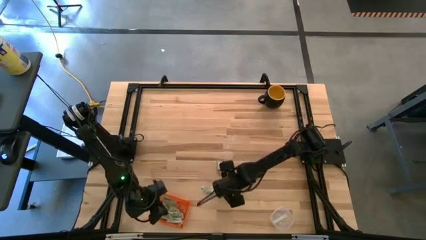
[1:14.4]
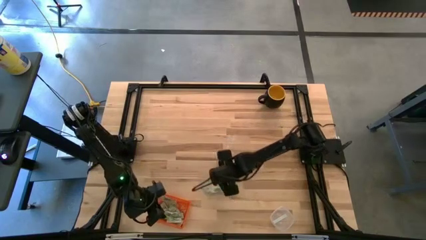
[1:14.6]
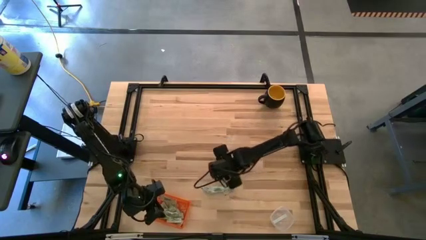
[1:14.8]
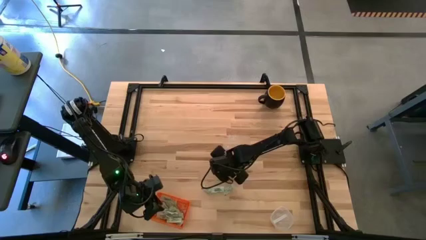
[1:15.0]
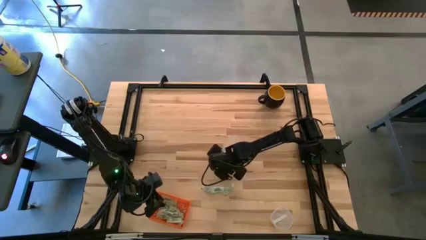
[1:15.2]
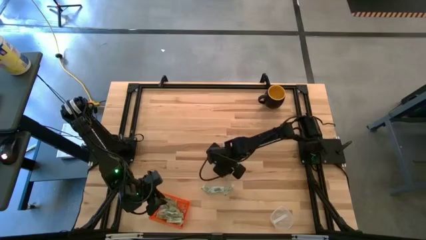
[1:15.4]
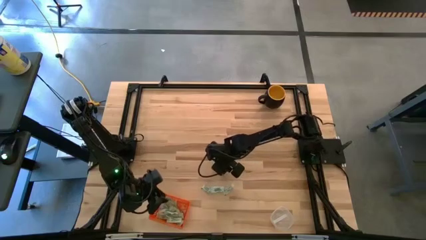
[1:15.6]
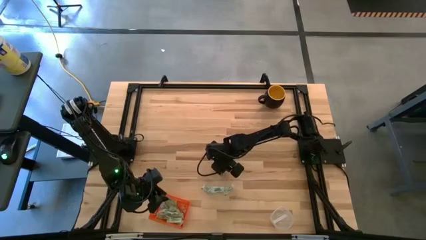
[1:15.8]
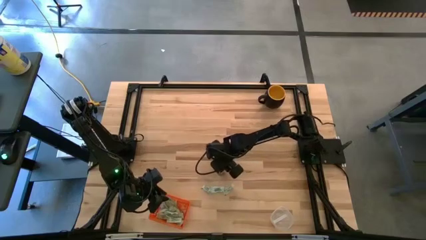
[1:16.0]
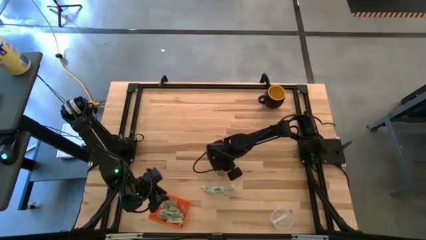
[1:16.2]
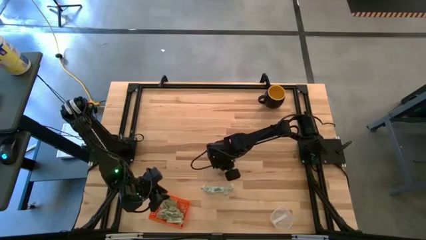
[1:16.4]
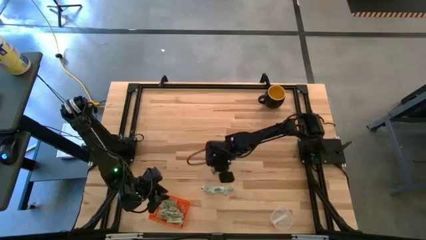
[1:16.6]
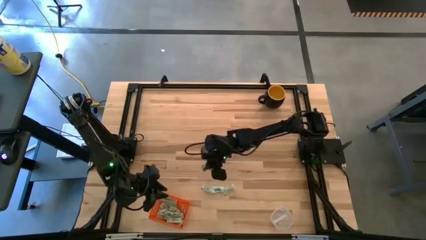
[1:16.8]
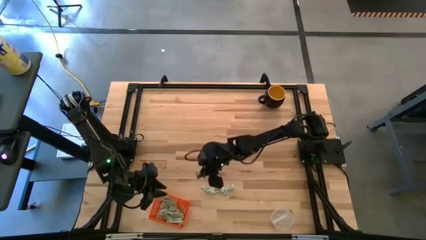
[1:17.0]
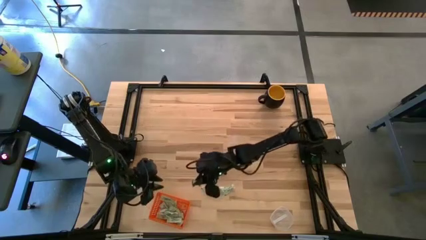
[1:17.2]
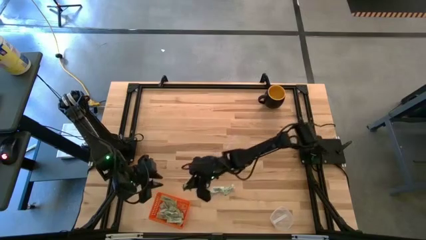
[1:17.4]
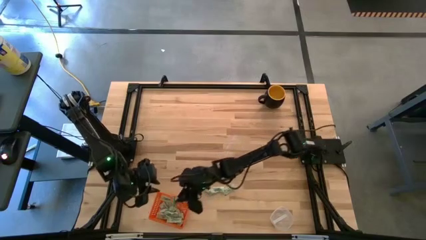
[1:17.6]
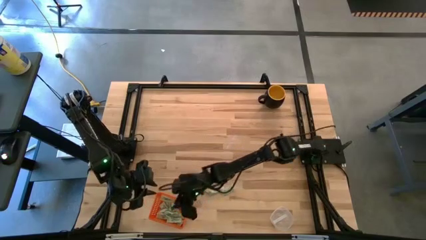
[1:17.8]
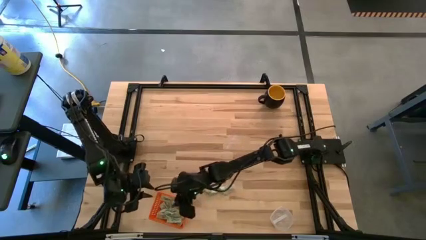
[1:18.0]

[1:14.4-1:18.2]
Task: Pick and place items into bin
Put the green stevia packet into the orange bin

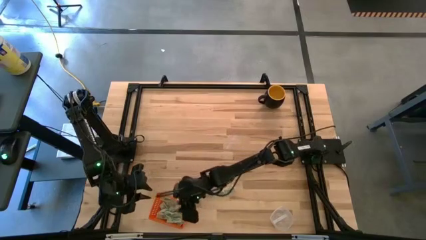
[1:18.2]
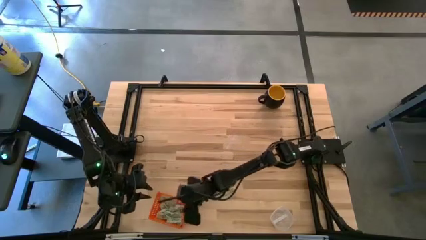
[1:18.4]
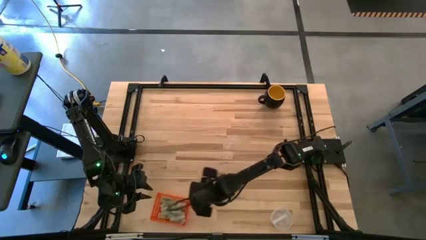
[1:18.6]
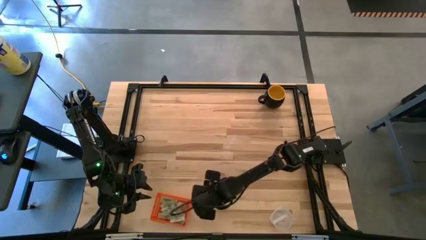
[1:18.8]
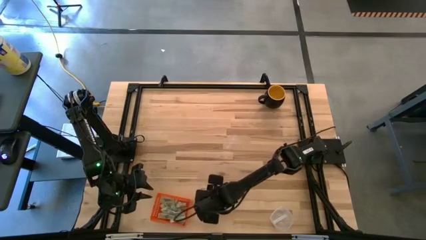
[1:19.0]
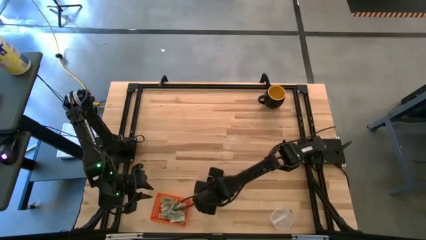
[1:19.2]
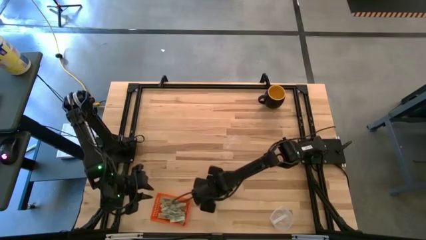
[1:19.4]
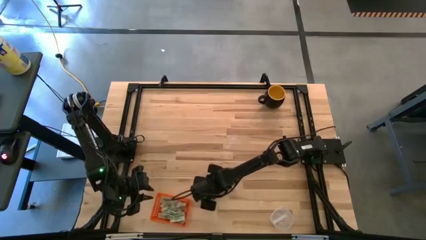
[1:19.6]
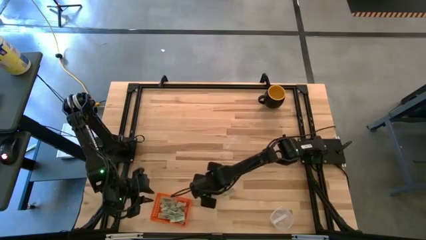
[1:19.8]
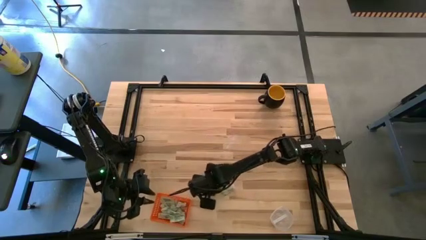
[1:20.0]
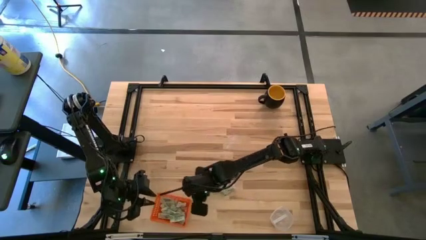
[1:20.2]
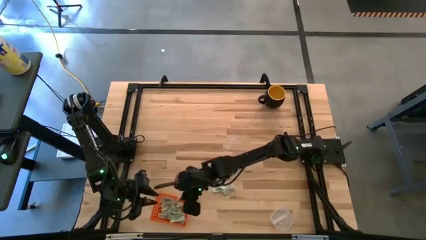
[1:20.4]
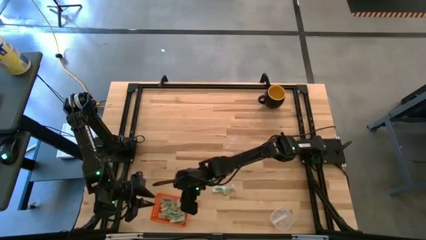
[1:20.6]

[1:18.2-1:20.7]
Put the left white stevia packet into the orange bin

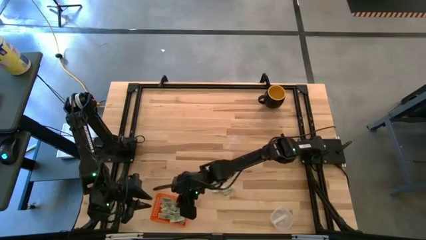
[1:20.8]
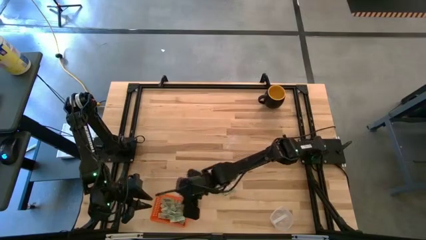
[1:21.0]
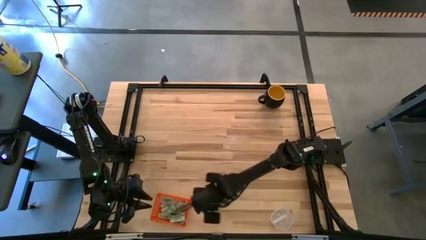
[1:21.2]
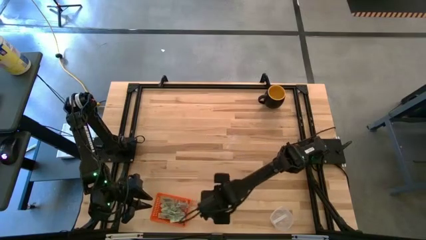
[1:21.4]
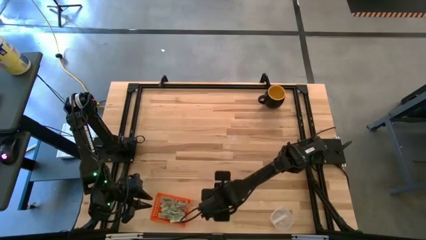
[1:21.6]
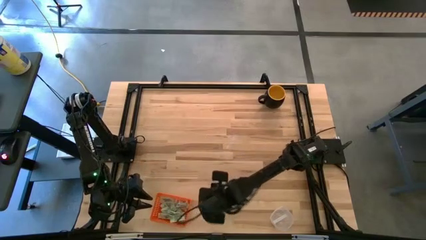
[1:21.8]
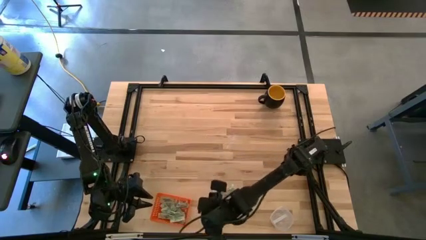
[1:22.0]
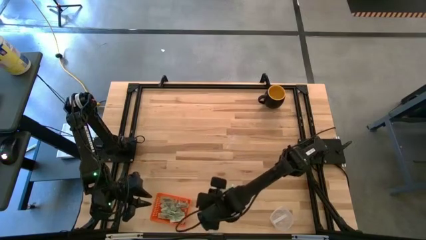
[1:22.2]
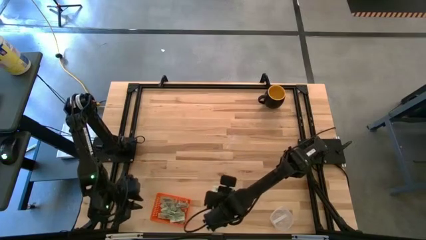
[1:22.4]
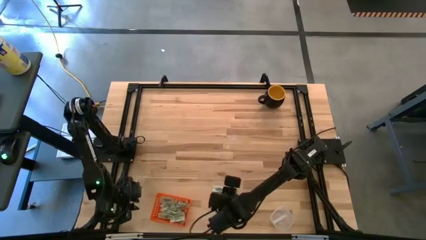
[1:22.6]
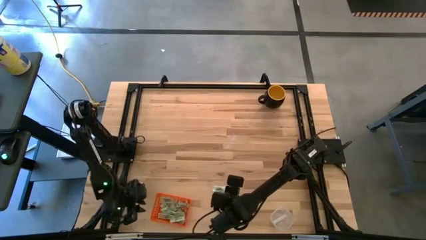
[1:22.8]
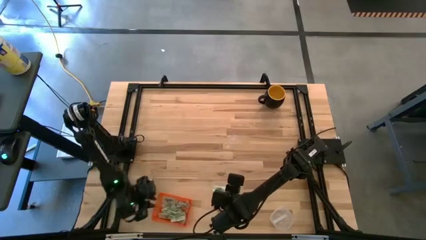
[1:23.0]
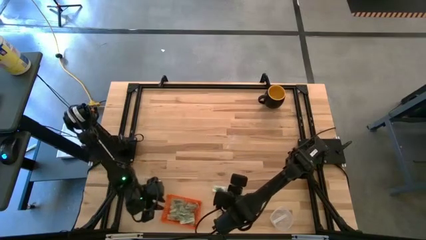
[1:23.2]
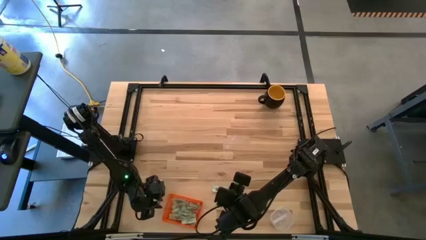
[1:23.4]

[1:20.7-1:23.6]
Adjust the orange bin

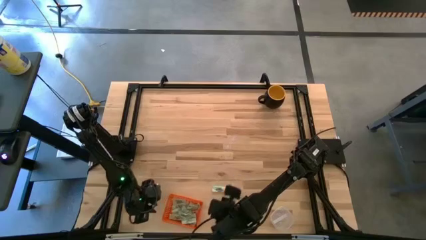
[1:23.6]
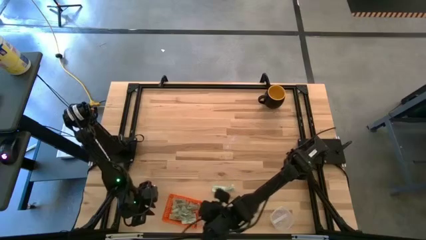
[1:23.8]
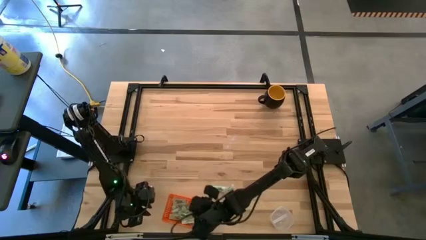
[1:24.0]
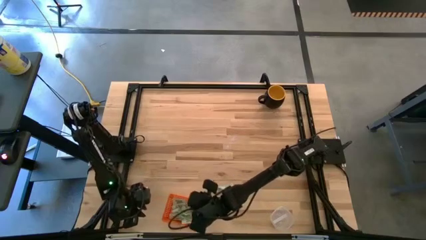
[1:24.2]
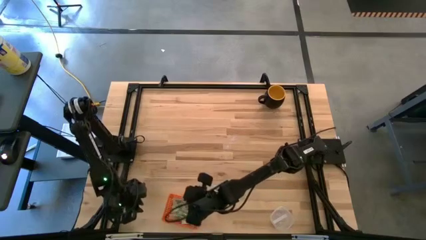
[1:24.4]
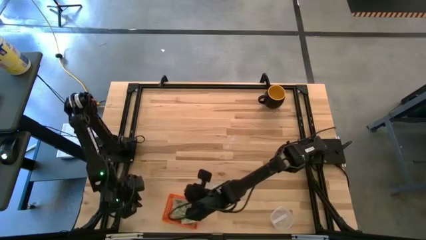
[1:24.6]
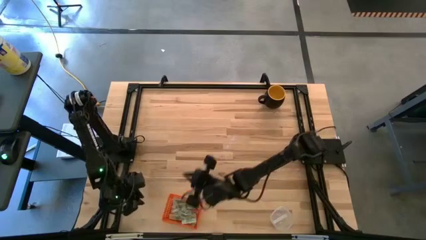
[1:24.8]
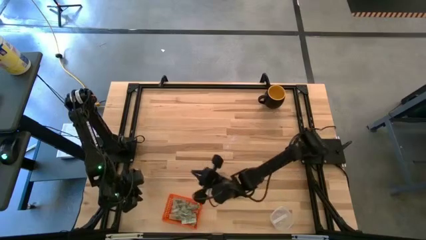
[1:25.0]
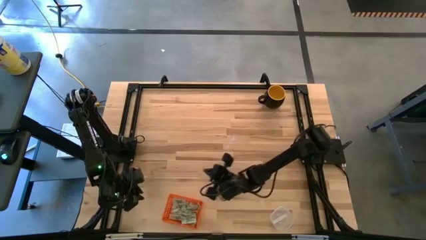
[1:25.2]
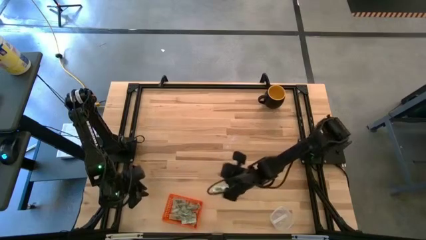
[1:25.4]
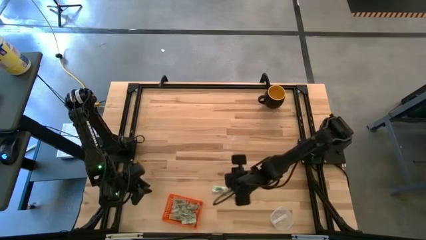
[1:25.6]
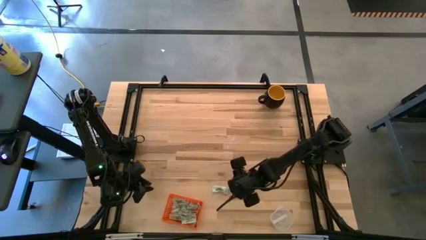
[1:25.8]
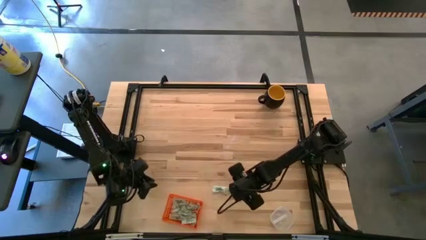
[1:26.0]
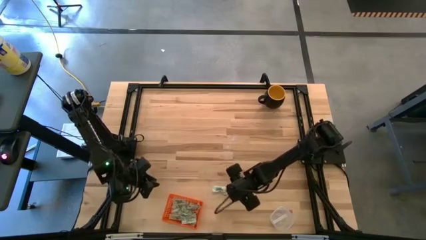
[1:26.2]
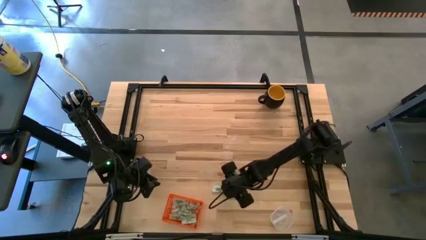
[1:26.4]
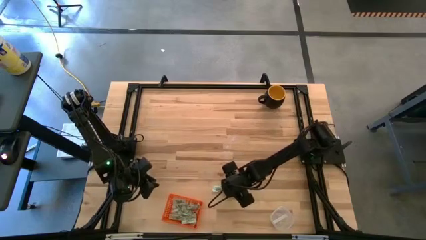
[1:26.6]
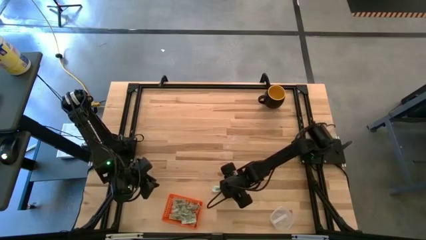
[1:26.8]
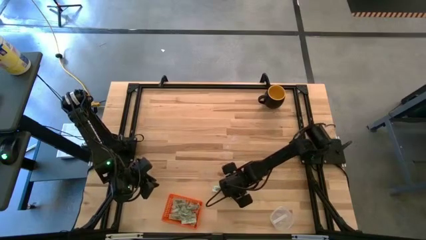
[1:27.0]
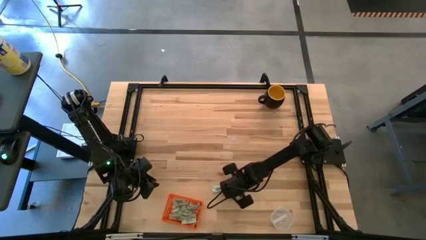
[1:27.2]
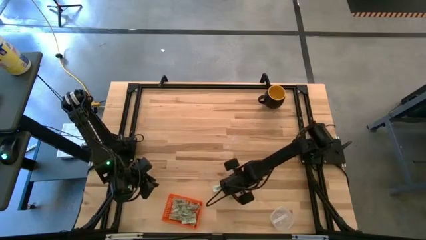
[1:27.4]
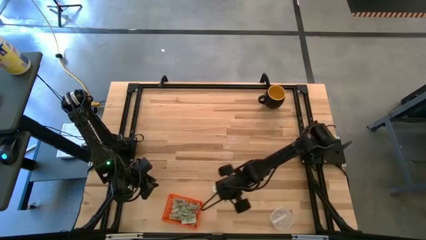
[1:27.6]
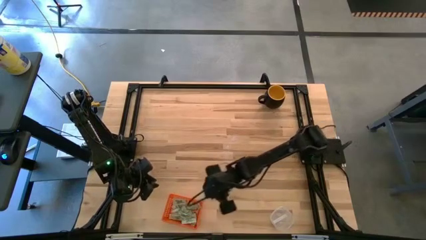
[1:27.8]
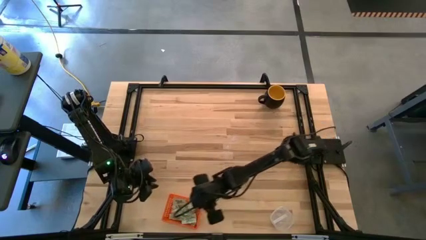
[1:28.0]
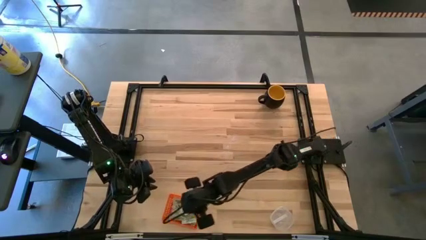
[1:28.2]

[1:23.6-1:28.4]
Put the right white stevia packet into the orange bin

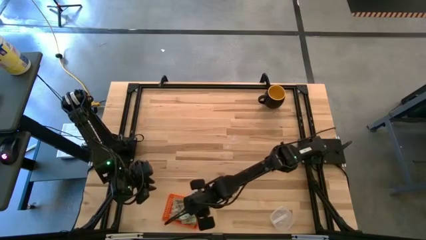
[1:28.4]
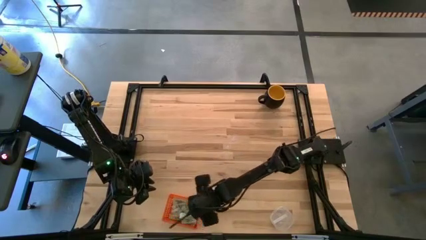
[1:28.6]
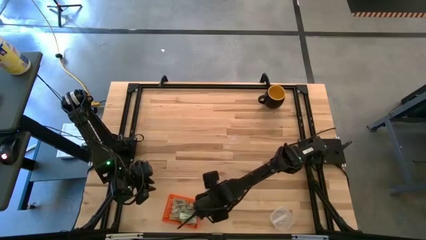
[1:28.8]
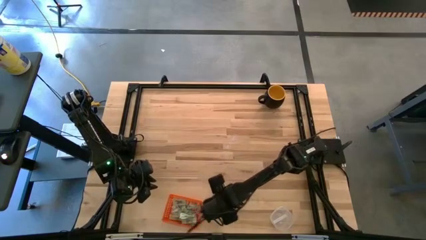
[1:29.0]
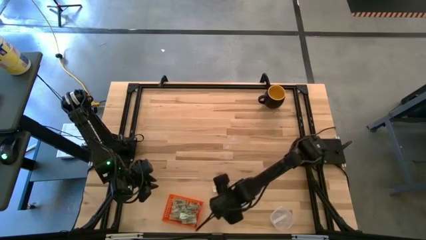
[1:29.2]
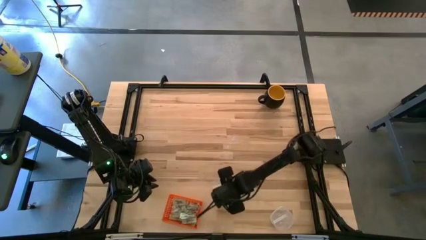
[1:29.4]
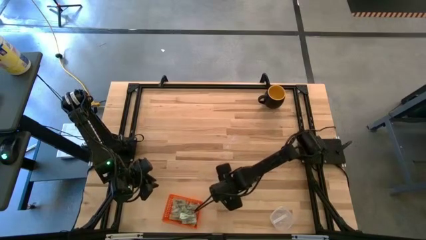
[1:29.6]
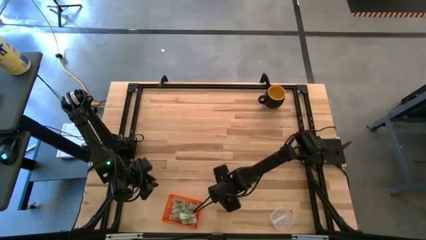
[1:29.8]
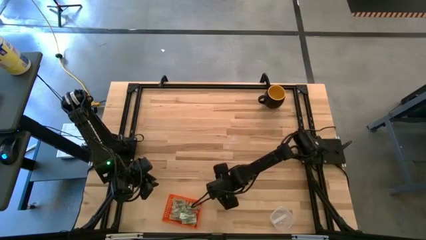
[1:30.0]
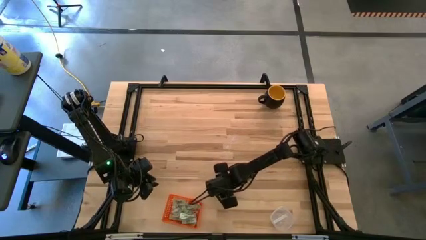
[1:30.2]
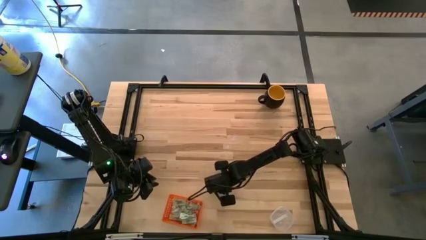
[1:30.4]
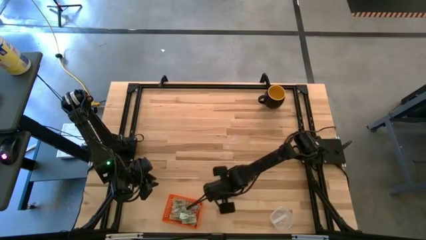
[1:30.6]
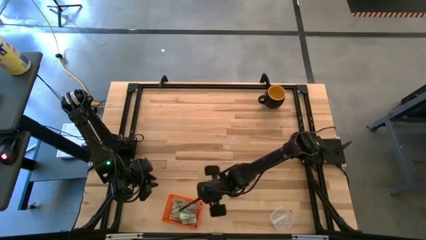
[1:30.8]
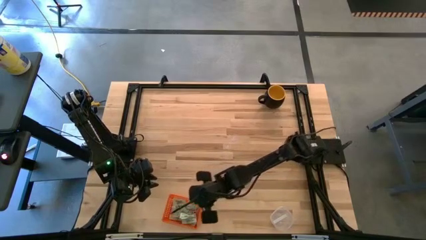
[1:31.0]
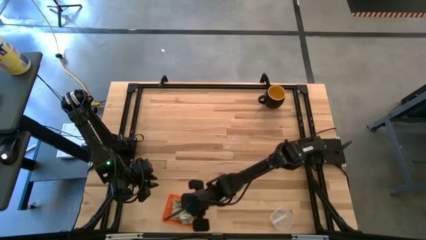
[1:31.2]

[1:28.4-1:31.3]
Put the white stevia packet into the orange bin
